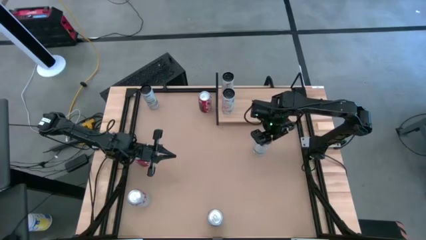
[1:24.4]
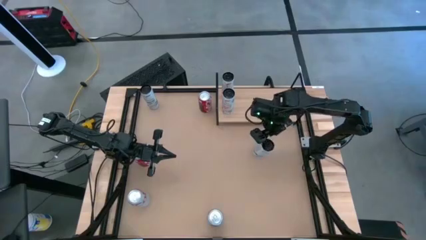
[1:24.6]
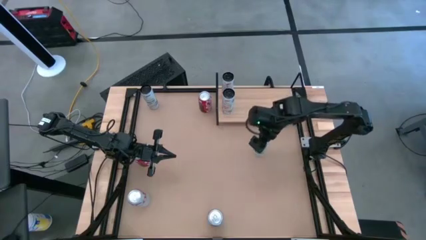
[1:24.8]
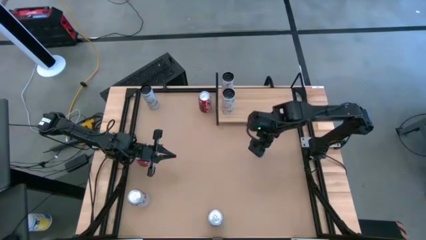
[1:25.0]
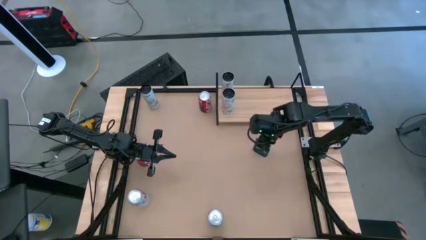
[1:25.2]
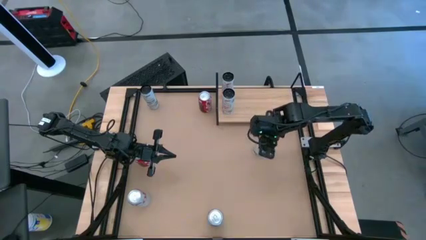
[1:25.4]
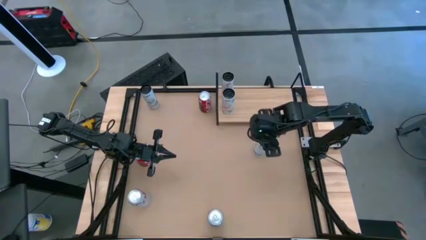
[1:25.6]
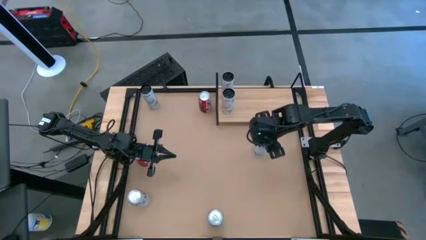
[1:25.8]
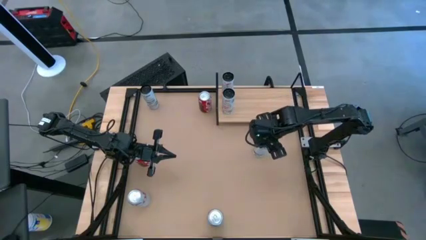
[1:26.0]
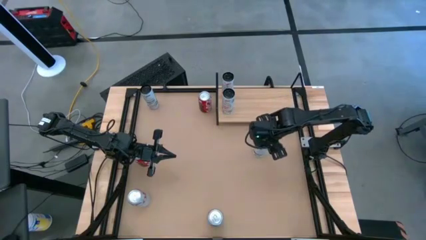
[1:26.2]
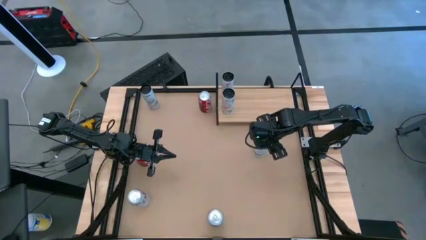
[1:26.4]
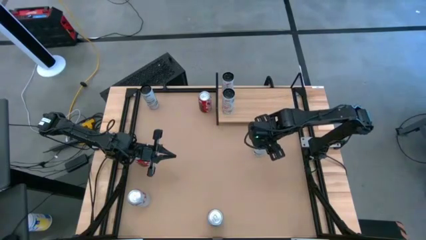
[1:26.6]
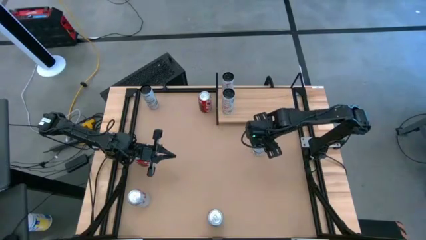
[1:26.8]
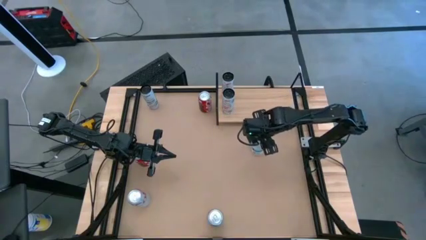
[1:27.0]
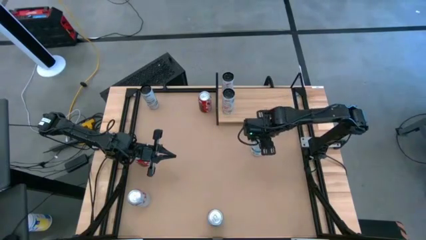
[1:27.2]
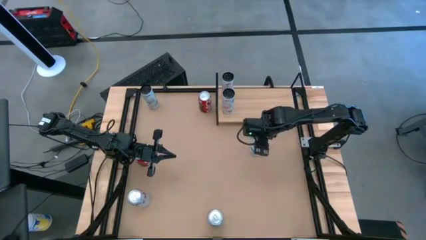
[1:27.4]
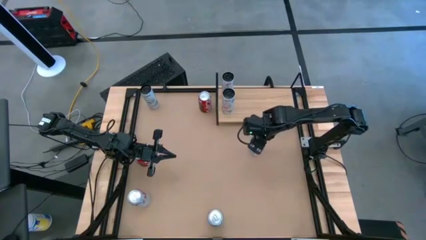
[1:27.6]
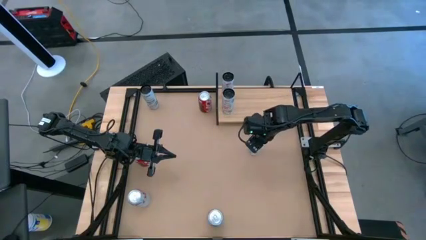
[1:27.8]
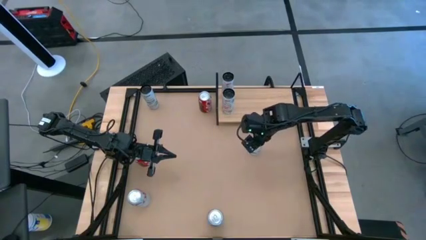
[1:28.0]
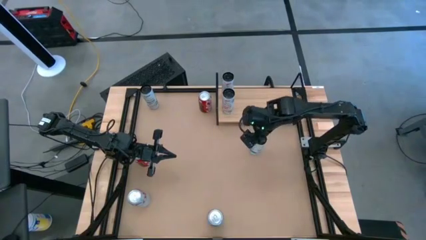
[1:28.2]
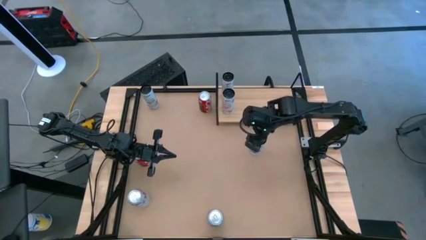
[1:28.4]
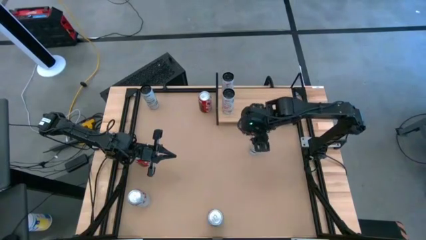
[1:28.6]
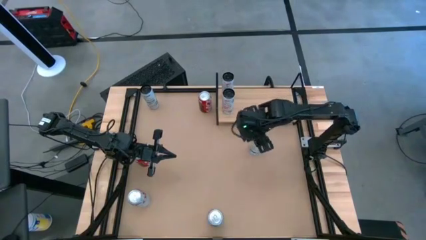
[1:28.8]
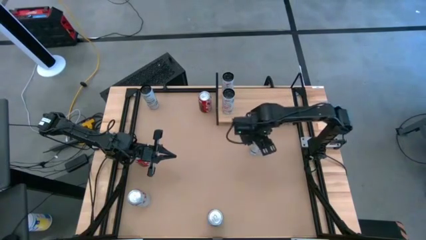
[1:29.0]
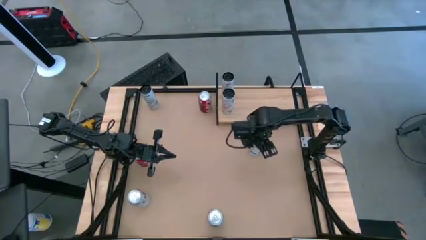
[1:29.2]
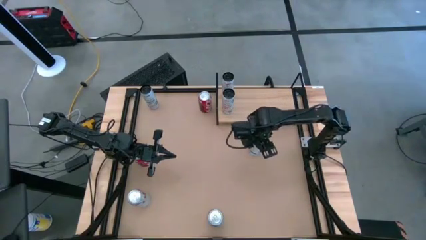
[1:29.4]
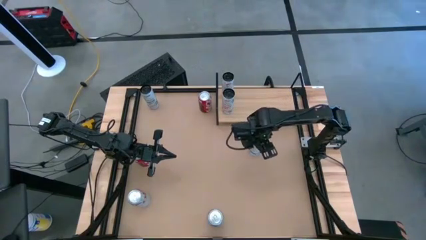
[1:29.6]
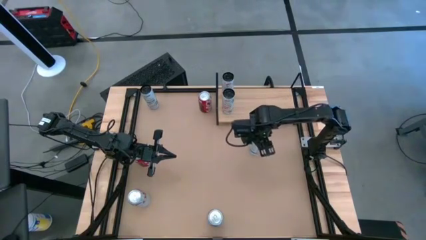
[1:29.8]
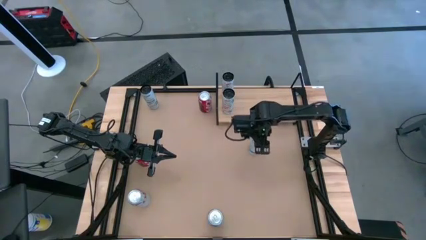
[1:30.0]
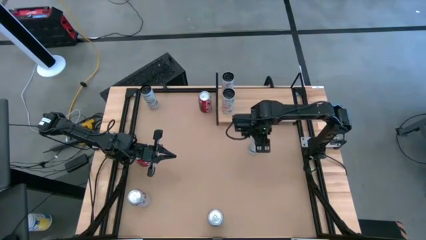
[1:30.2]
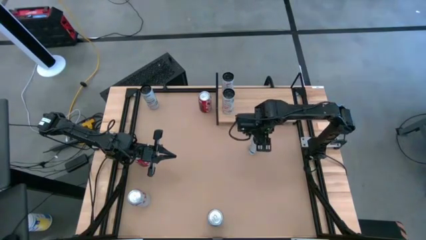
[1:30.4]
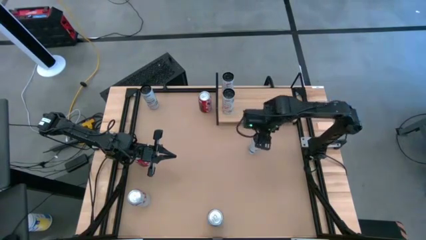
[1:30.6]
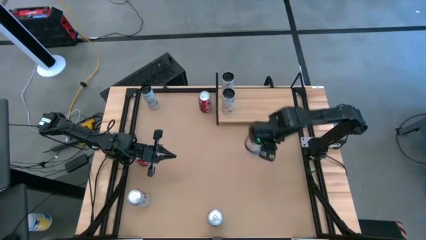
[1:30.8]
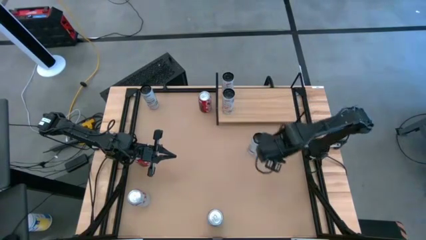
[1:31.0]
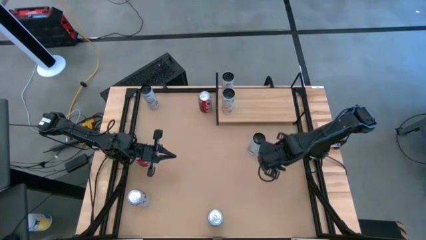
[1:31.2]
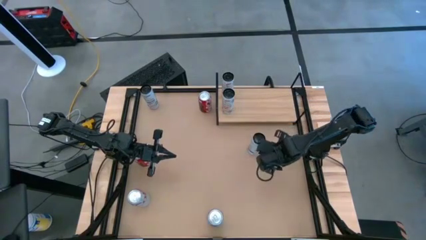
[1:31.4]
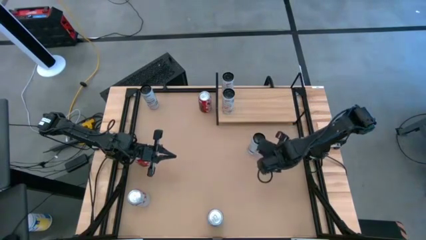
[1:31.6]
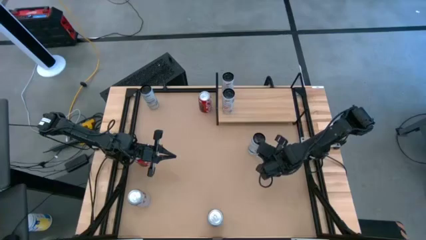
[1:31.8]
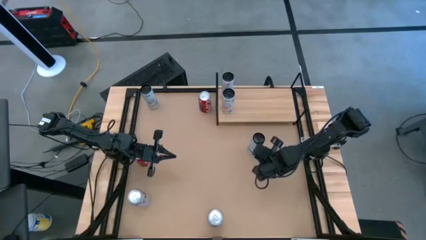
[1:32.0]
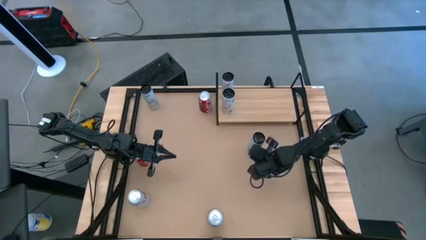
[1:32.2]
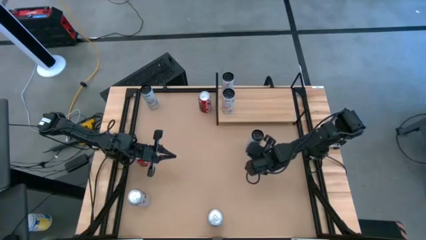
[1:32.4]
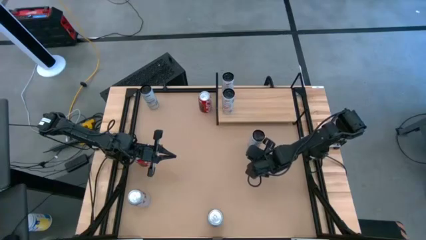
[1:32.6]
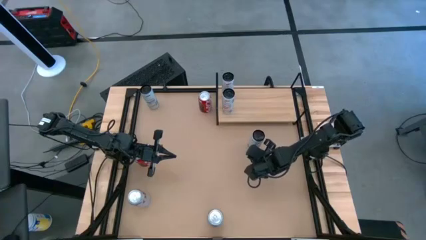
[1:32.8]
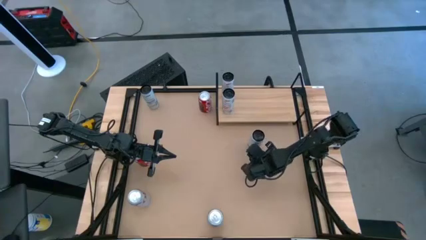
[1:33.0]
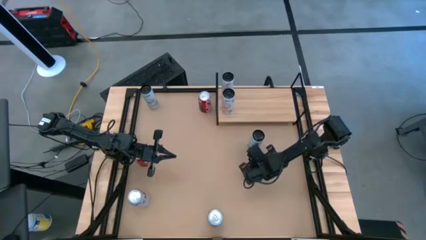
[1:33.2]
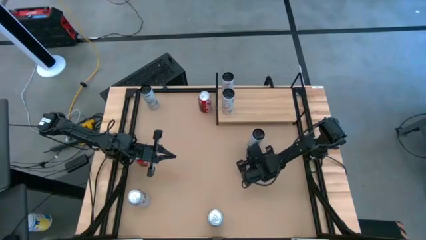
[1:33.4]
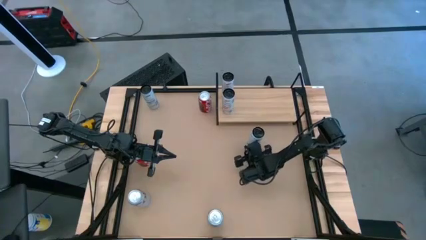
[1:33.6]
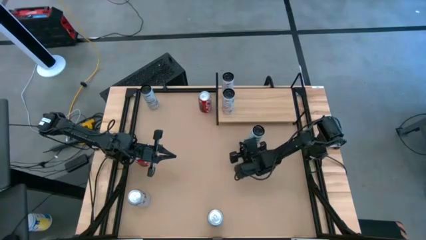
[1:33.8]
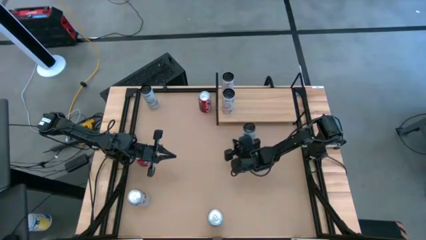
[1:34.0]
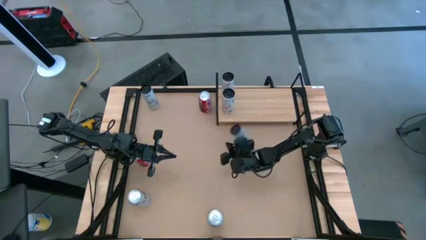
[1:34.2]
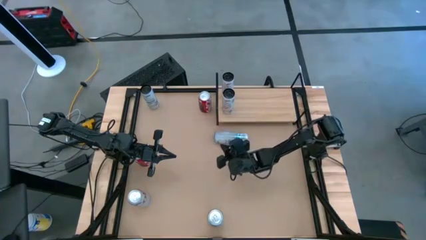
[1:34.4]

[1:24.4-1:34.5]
Task: Place canned beverage on shelf
Put the bottom white-blue soda can on the shelf

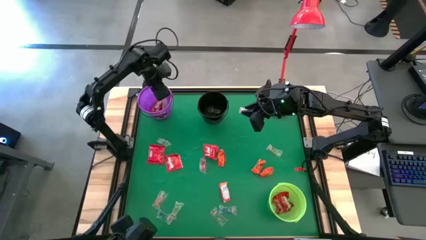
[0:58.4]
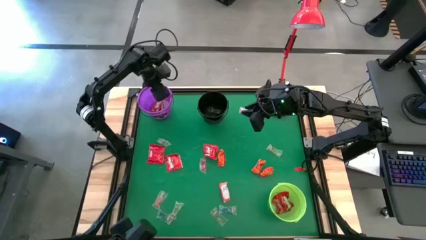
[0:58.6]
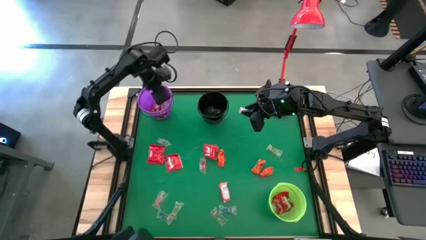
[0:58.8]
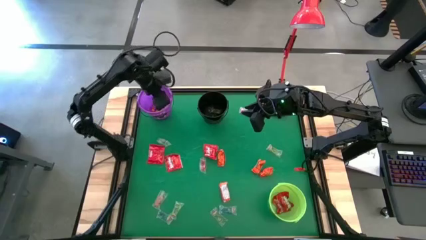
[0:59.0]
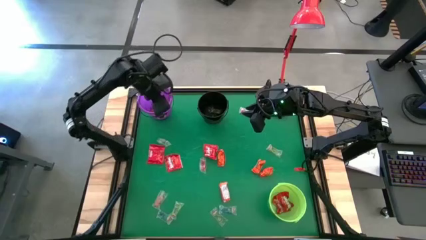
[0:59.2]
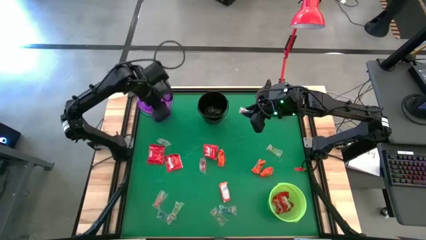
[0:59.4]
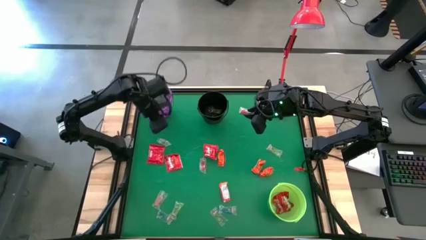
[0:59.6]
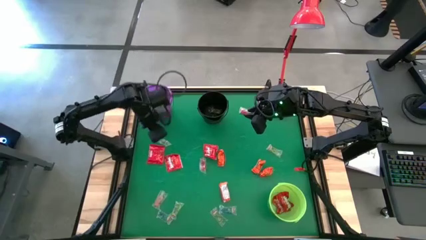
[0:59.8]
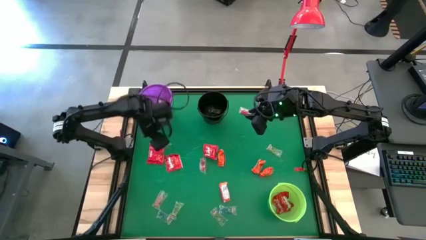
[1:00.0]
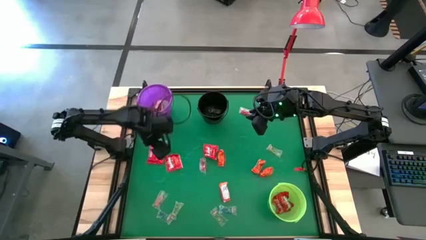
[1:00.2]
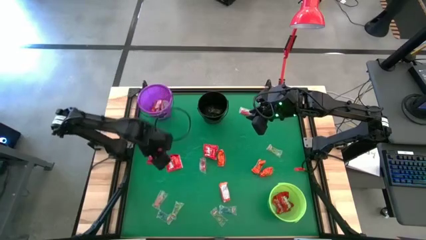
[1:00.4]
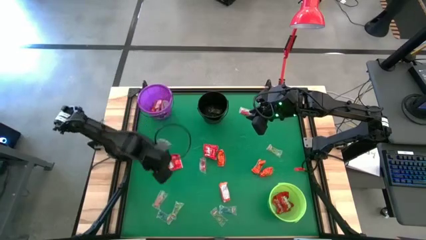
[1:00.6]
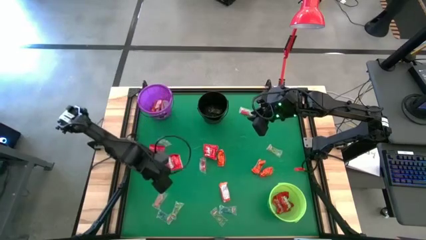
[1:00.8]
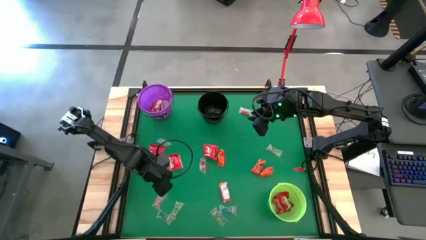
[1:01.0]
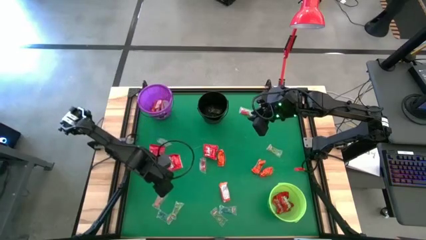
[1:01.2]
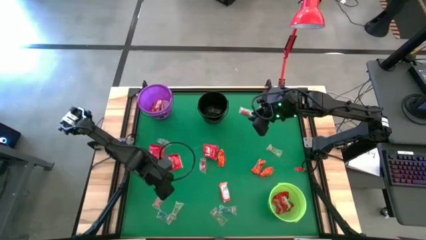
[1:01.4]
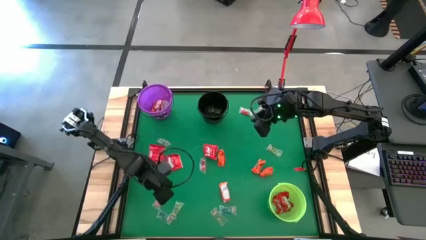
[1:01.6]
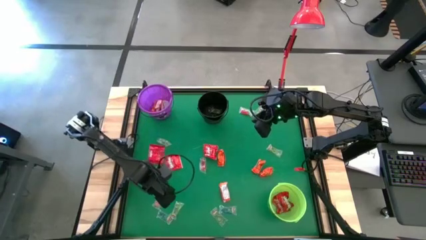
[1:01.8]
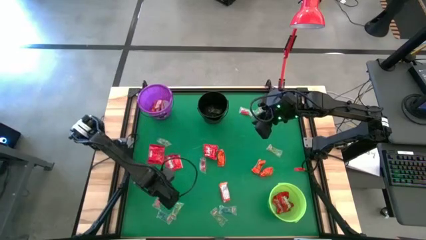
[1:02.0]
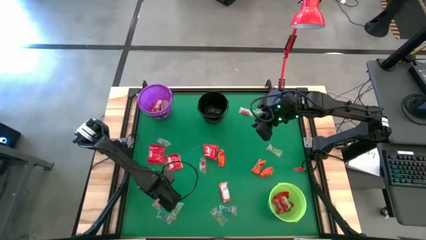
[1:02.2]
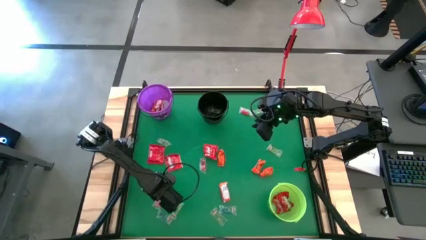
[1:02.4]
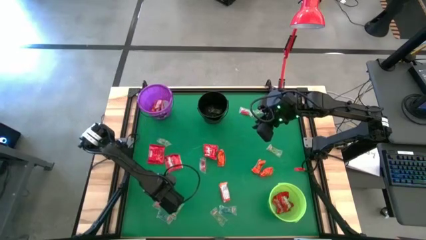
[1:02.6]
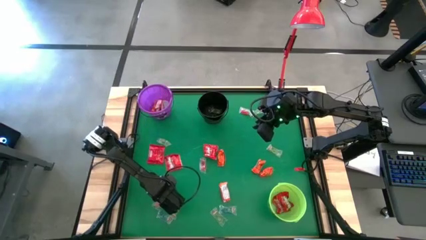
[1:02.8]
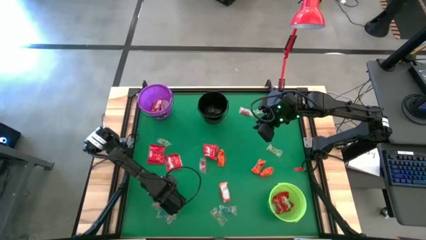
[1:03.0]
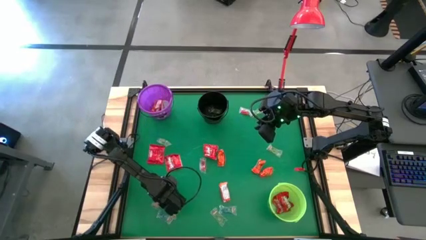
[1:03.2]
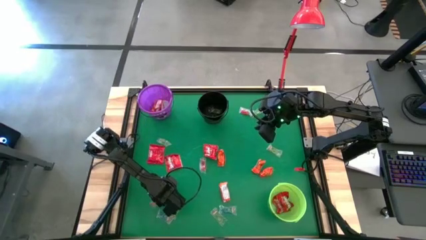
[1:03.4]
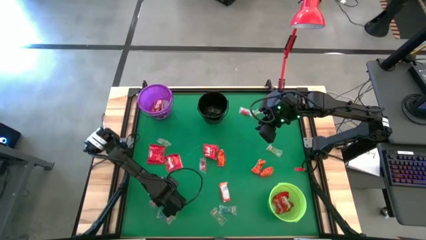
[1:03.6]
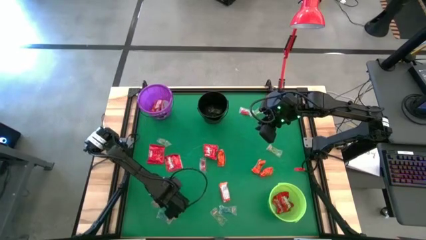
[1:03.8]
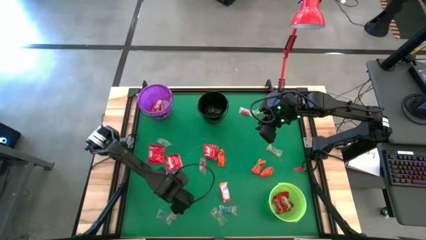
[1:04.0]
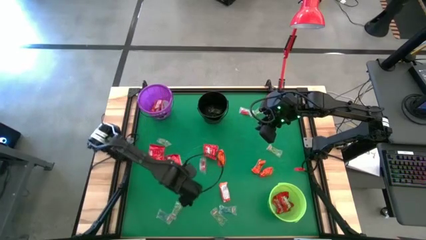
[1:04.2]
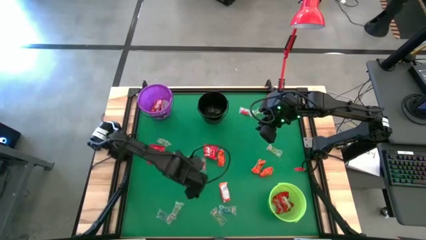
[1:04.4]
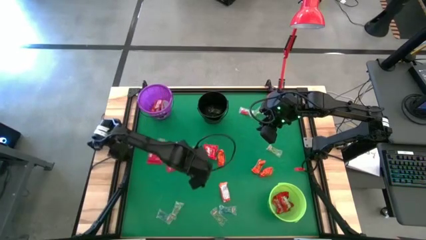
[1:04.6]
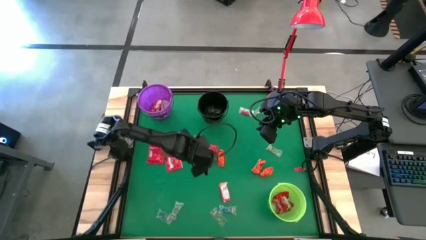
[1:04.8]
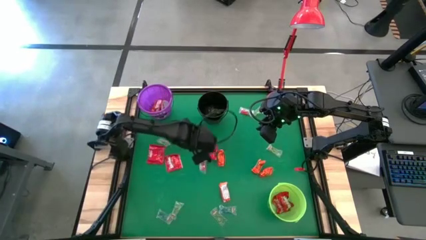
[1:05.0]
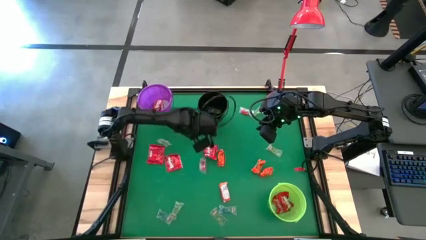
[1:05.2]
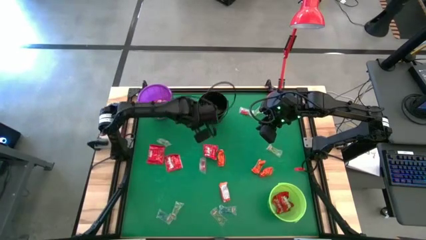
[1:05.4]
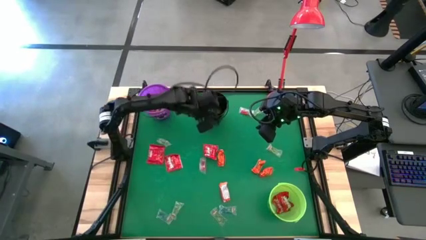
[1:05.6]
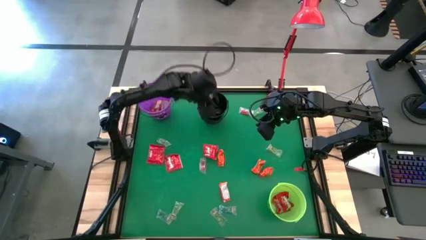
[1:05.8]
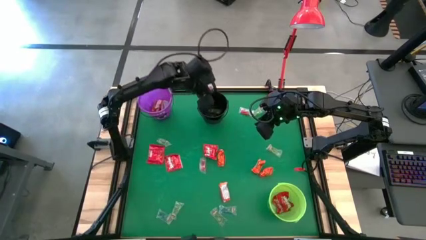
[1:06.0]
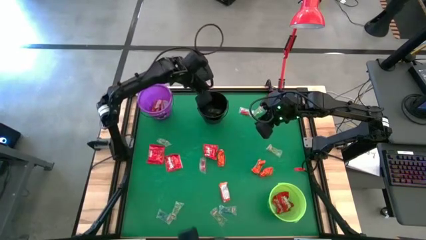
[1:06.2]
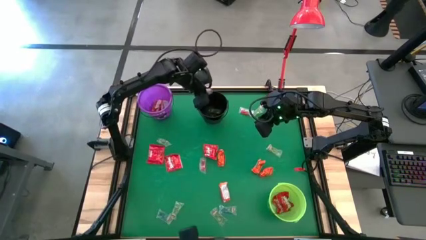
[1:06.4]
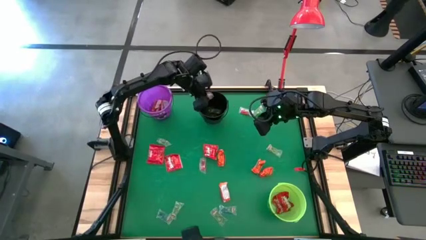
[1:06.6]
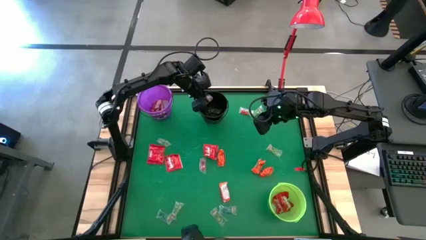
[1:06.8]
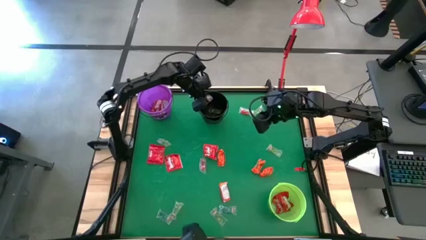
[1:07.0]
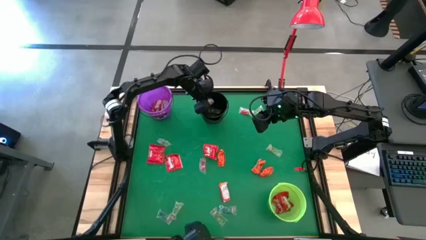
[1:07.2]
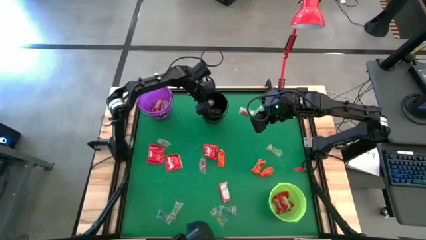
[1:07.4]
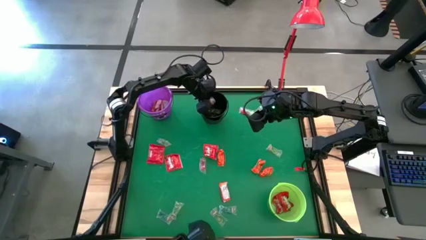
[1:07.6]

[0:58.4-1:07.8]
Task: Sort candy
Put the orange gummy into the black bucket
